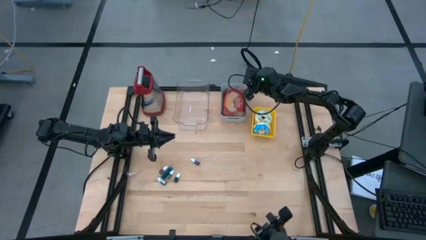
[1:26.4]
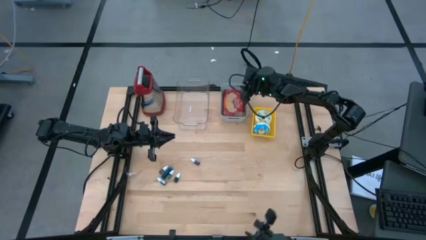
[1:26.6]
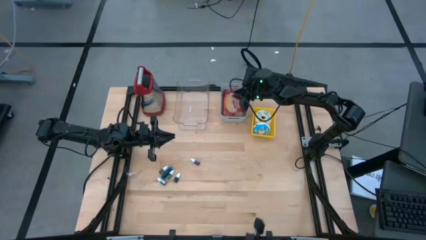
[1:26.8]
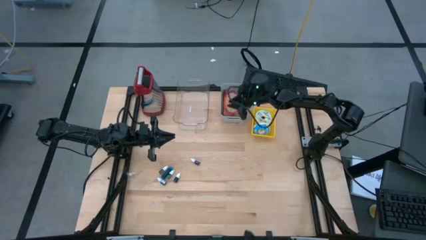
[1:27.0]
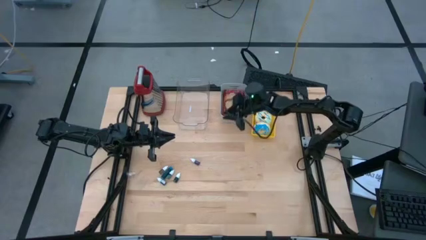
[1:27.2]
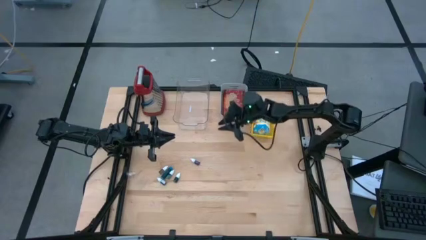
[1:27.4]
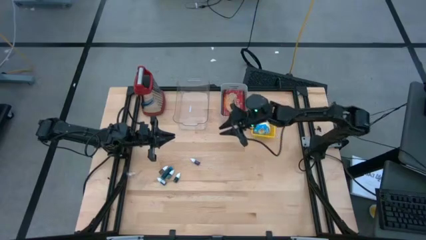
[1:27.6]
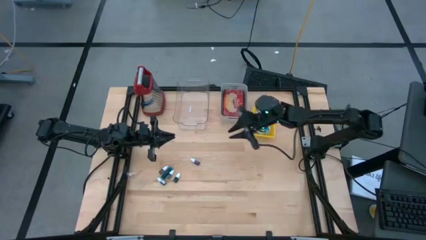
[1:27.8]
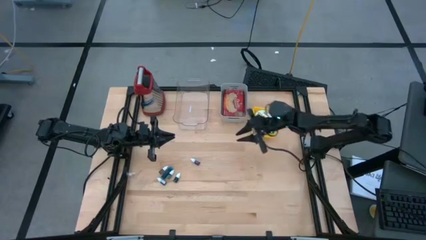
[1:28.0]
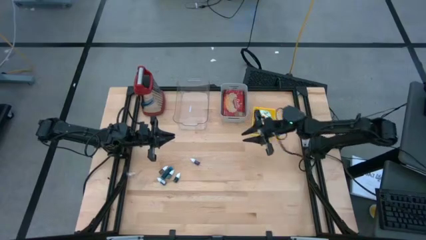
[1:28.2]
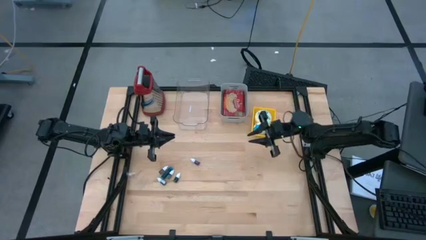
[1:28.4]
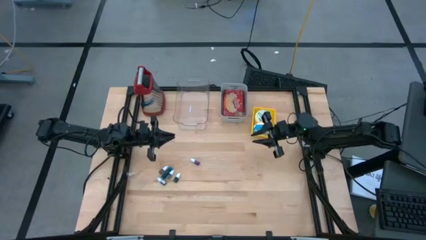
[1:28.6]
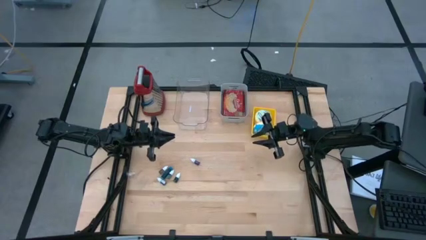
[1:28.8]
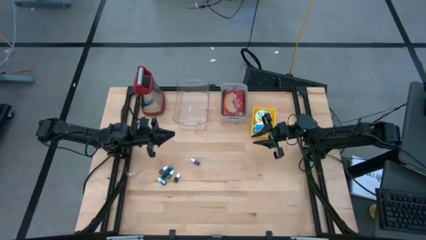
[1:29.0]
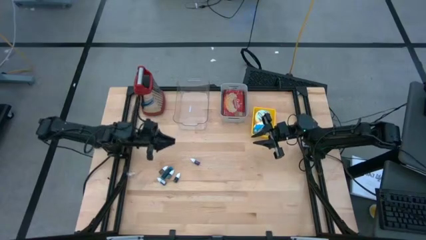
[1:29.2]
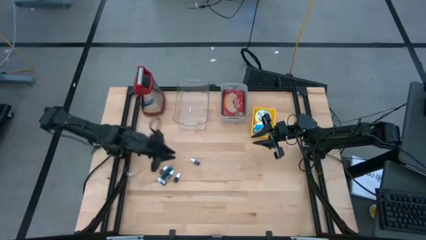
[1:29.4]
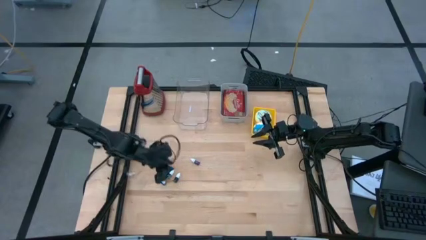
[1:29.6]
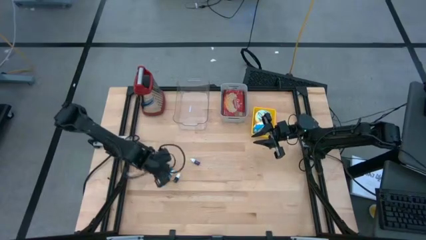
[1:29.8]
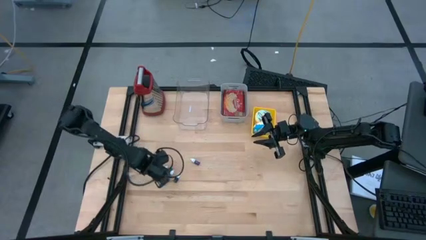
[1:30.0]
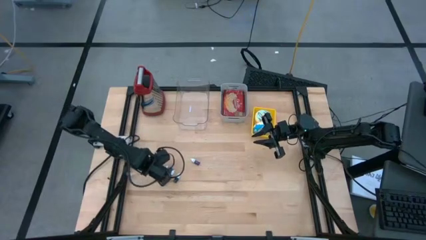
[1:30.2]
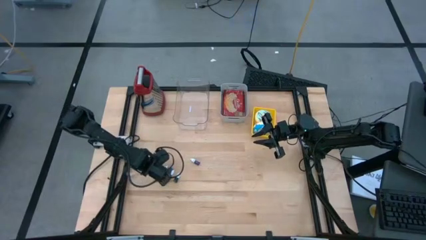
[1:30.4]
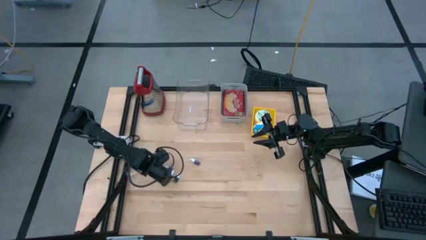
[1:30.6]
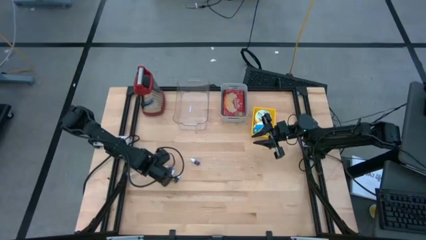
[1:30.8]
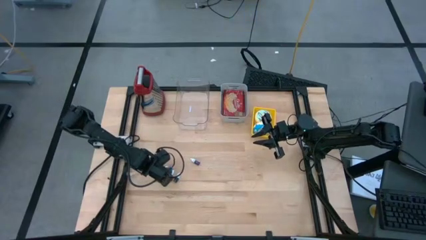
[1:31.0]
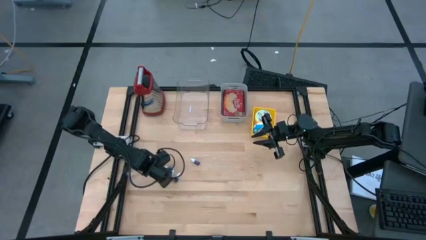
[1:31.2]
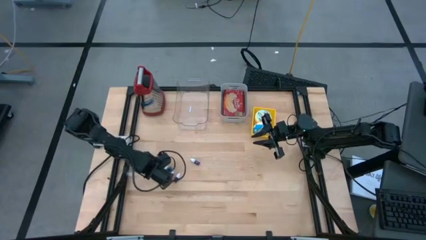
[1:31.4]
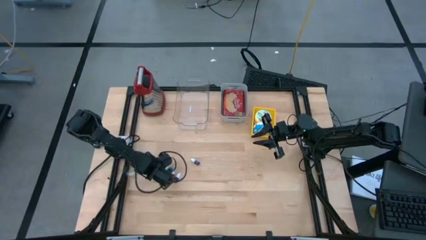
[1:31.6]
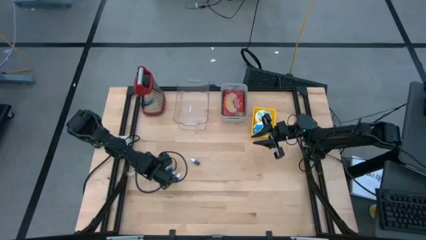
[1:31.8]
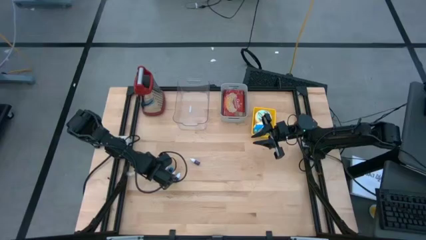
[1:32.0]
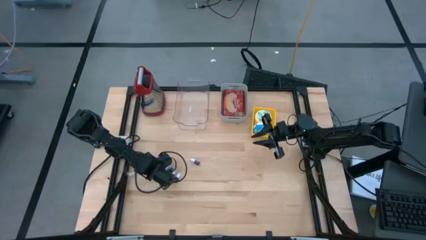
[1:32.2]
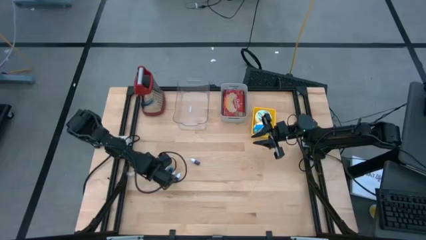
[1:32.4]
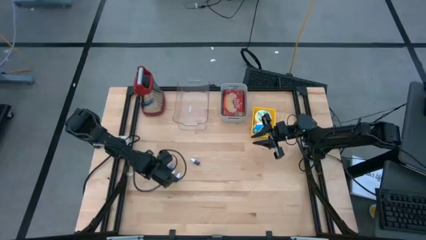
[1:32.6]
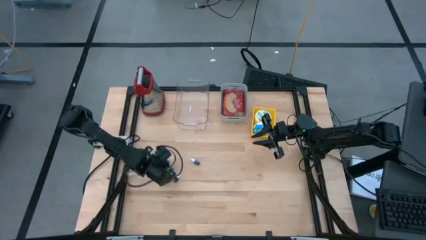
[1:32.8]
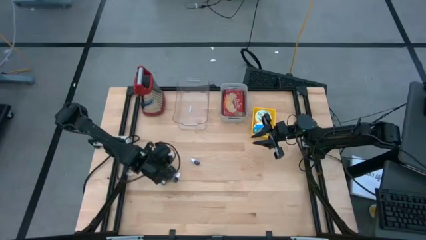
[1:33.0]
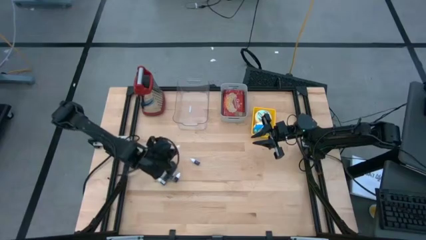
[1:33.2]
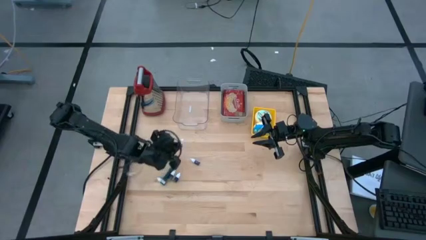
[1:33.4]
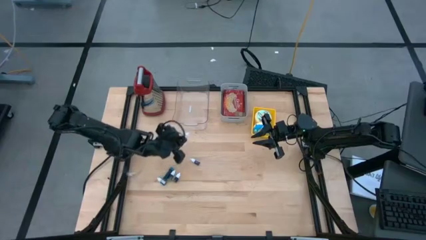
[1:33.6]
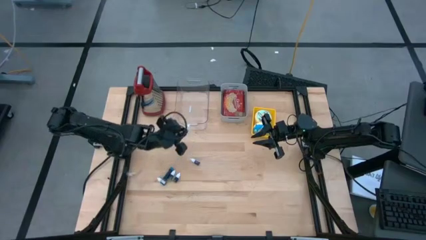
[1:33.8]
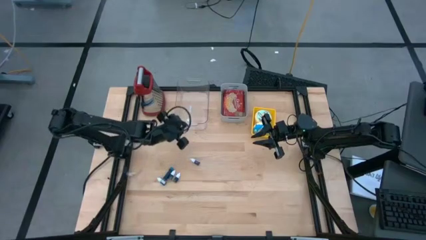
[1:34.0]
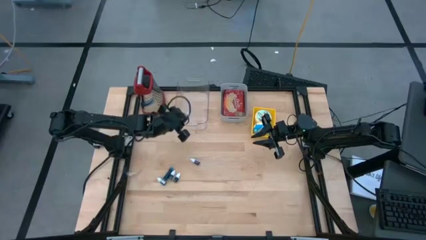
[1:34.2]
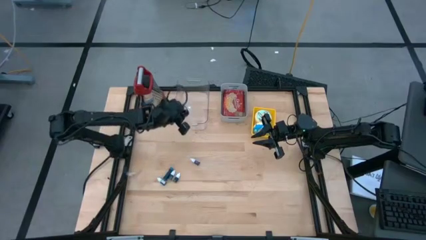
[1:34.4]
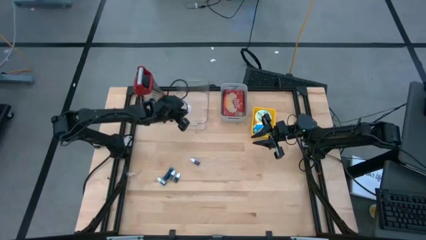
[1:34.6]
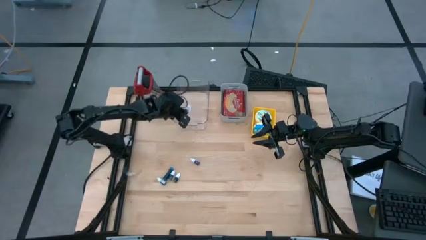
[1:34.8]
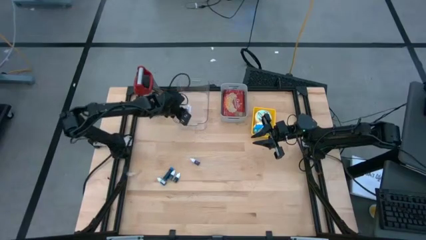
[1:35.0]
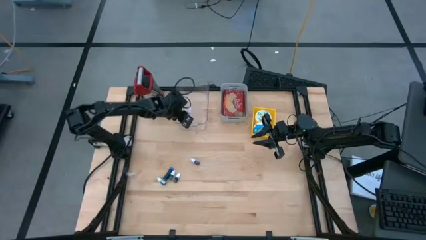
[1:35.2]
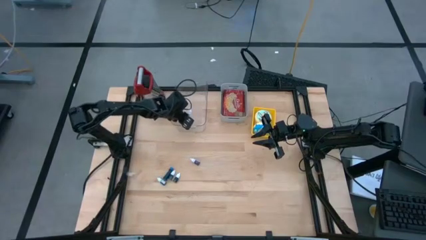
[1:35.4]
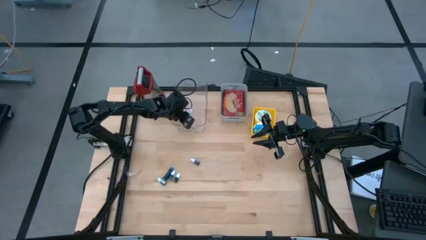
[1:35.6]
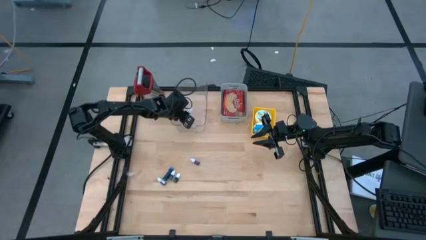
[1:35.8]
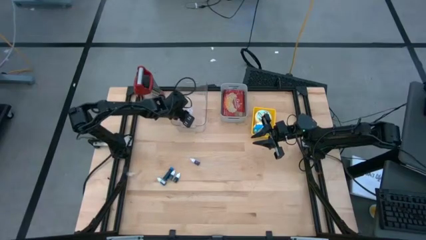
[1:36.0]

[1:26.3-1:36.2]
Task: Pick & Place Food Item
Put the brown food coloring into the transparent bin

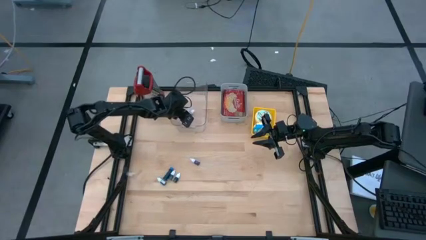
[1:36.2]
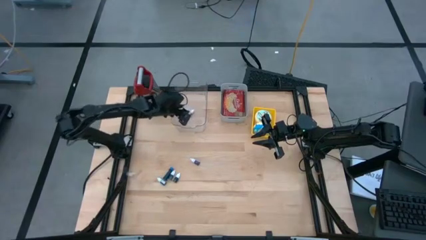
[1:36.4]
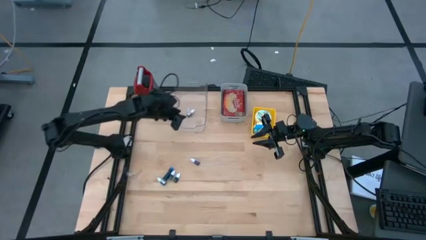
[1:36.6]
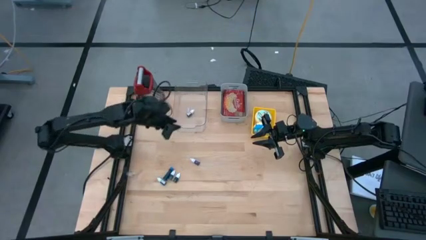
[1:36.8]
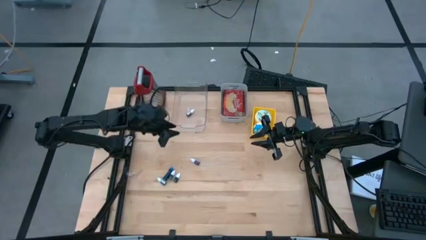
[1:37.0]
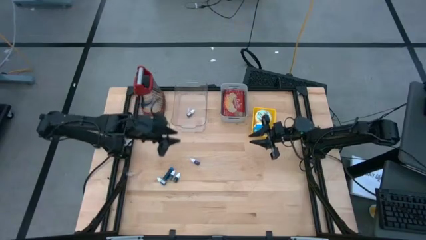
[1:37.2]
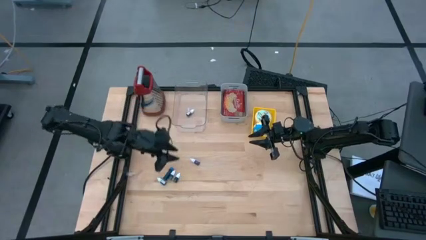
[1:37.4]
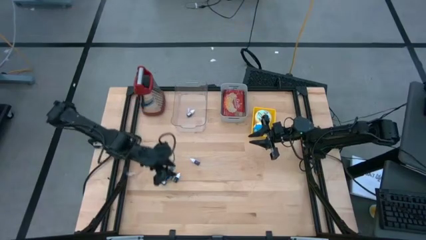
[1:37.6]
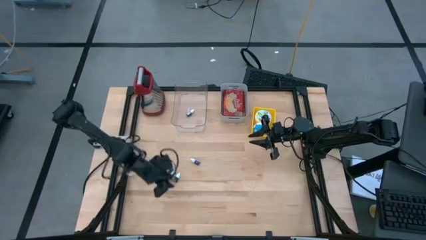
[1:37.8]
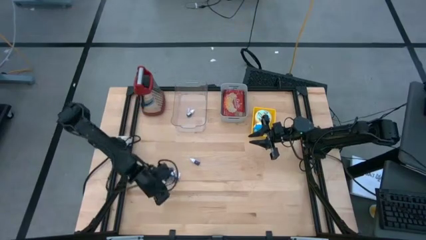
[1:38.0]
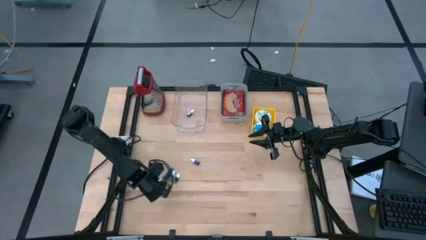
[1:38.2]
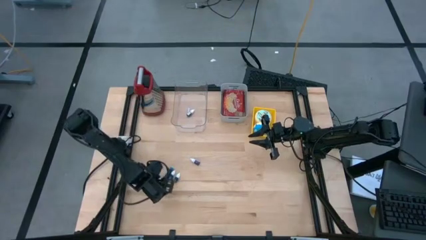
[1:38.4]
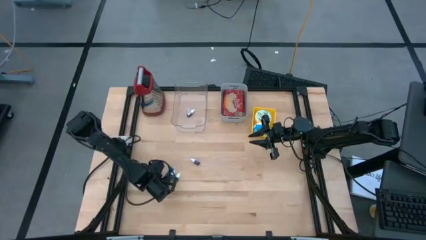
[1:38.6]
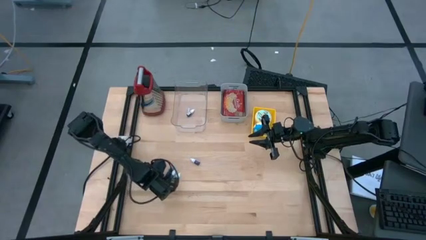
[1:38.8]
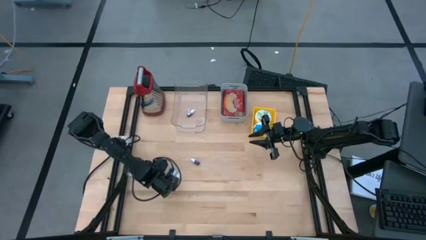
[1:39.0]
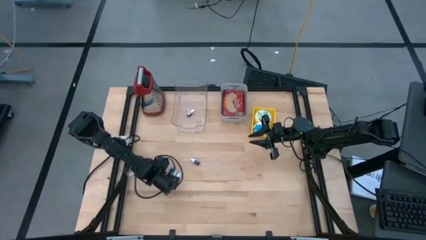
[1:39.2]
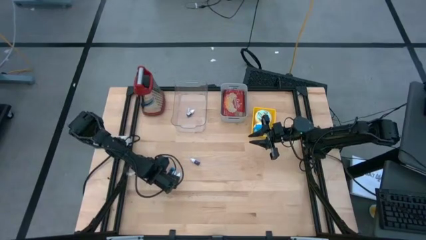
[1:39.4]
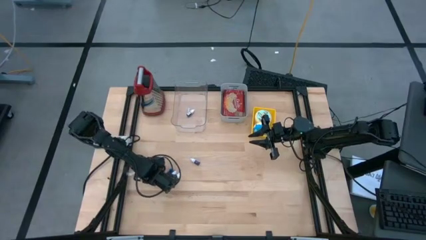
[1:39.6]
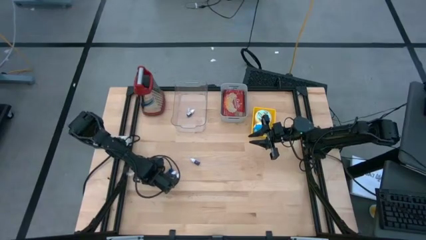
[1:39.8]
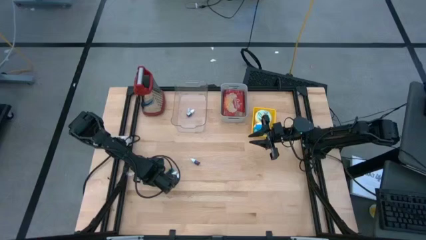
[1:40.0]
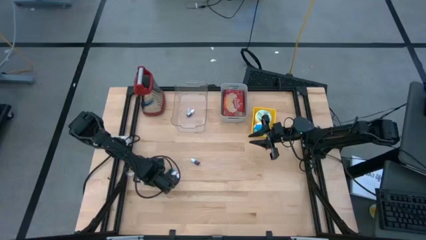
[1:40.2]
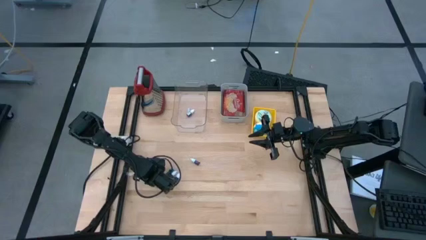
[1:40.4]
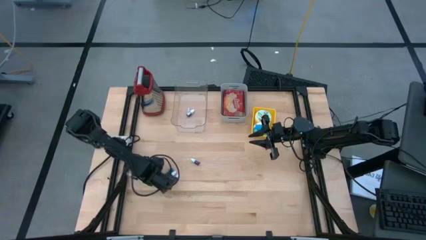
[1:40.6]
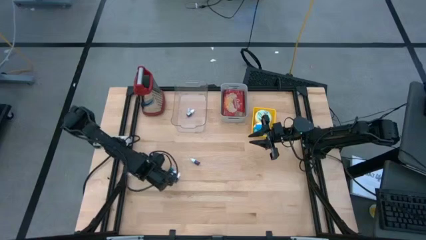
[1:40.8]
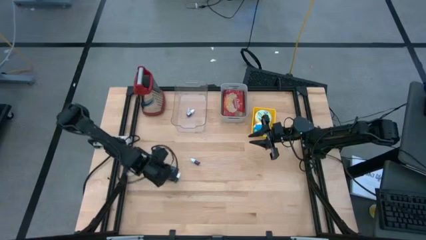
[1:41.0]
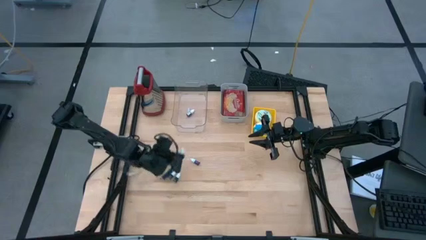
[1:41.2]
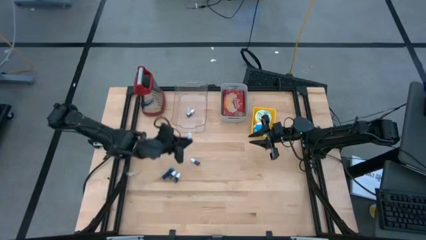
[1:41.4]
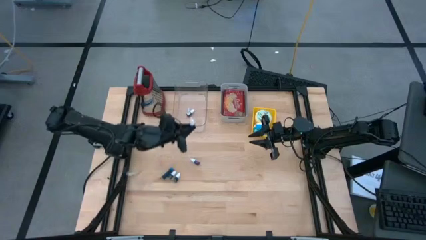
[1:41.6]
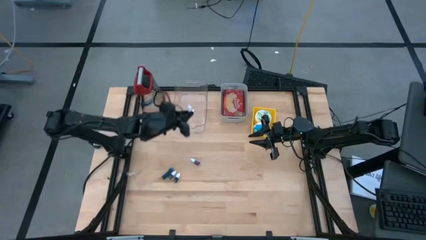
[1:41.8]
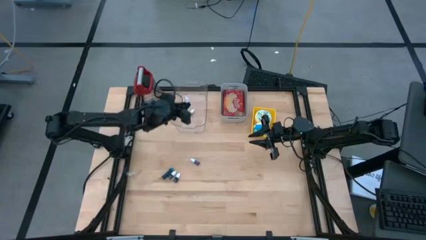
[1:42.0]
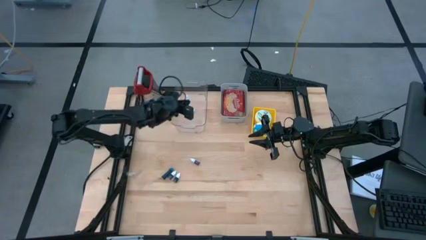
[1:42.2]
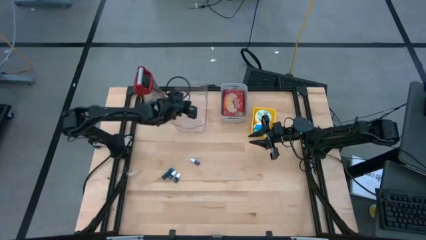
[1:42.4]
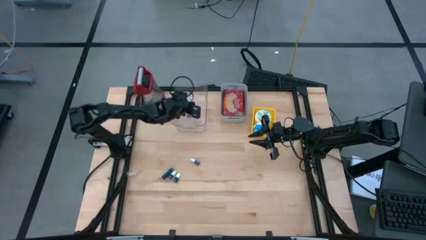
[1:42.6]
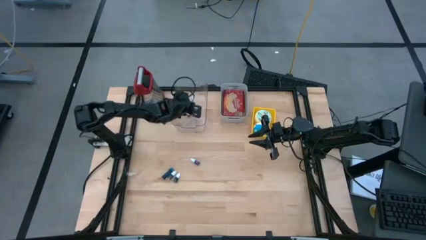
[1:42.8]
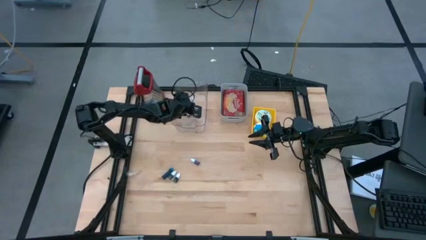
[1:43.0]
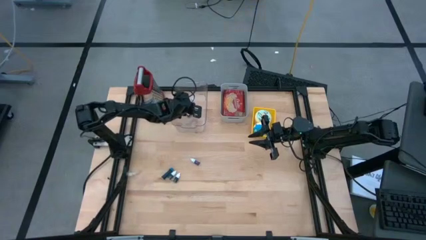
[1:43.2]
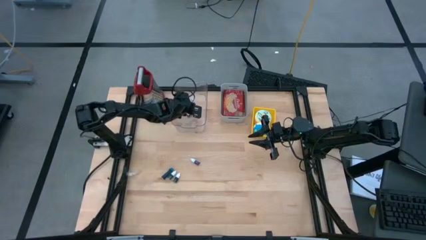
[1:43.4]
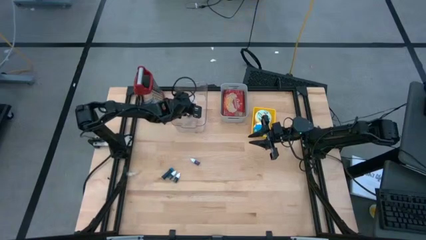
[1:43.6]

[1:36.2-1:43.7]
Put the black food coloring into the transparent bin
